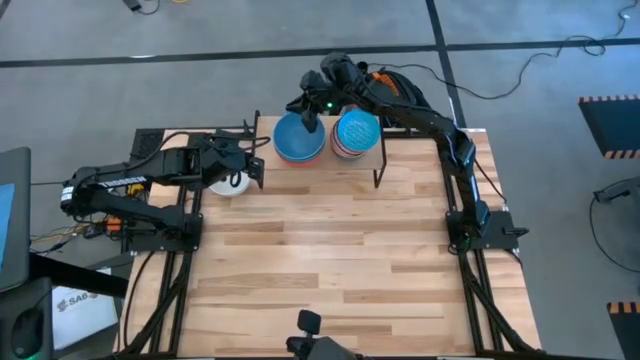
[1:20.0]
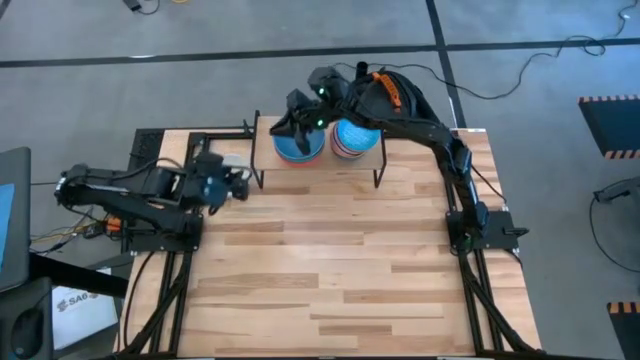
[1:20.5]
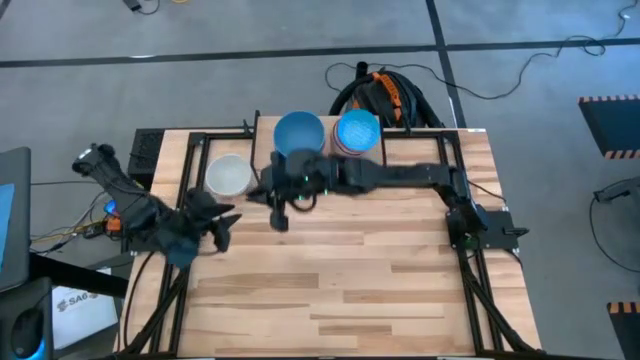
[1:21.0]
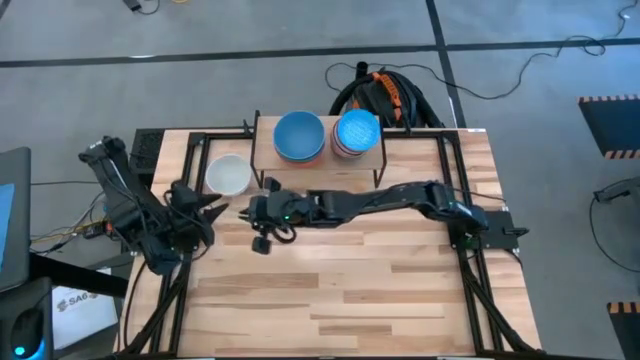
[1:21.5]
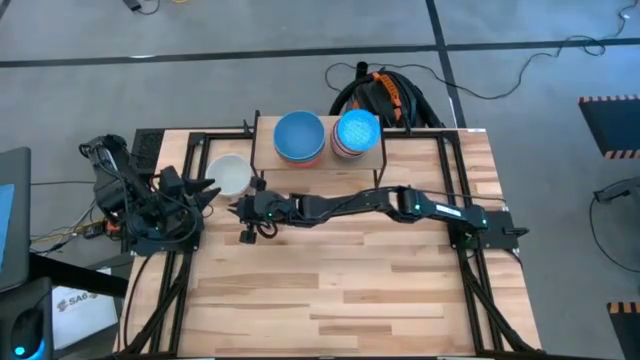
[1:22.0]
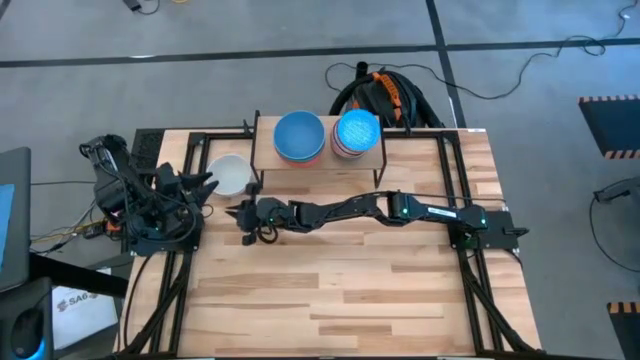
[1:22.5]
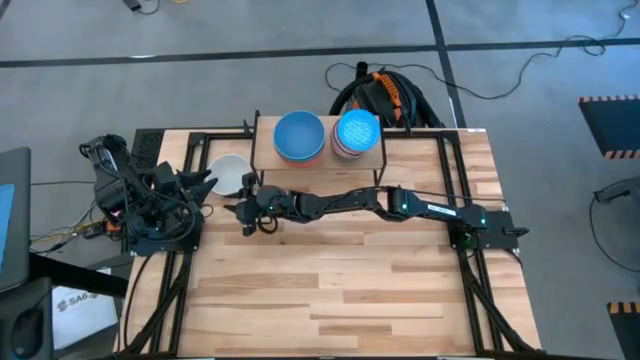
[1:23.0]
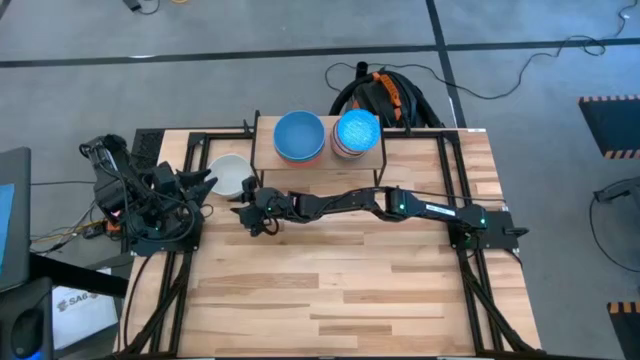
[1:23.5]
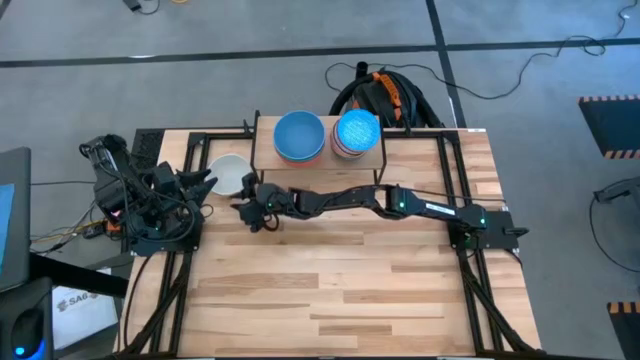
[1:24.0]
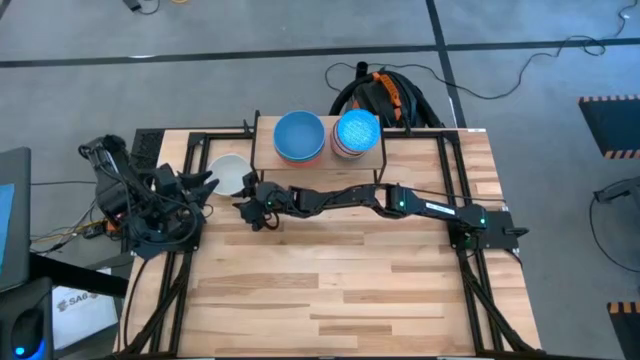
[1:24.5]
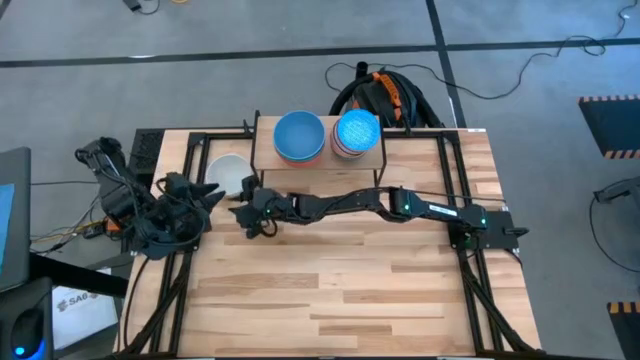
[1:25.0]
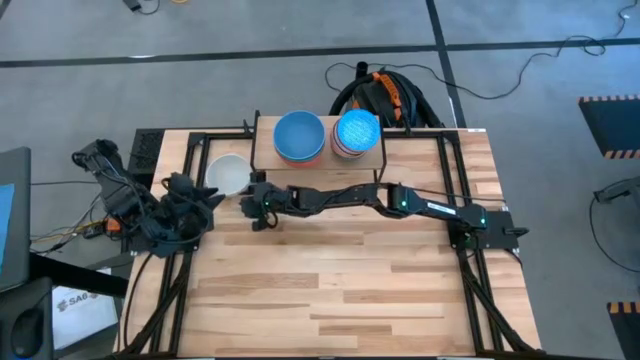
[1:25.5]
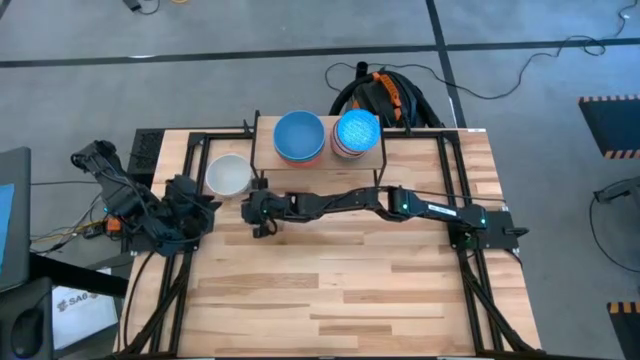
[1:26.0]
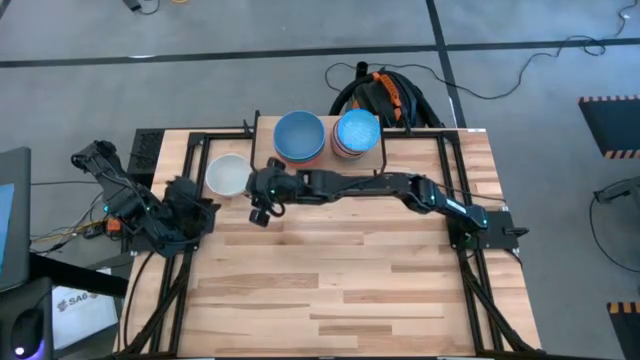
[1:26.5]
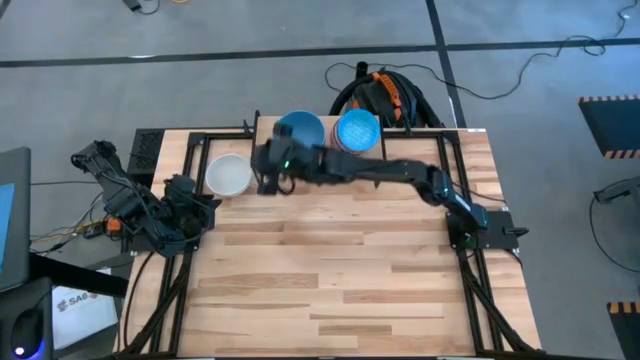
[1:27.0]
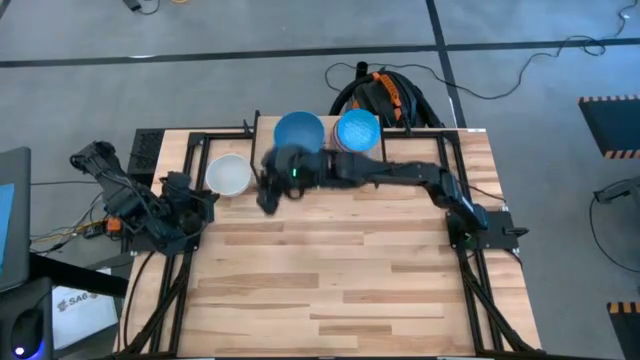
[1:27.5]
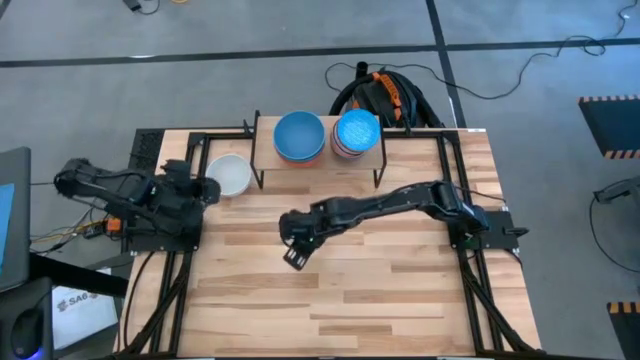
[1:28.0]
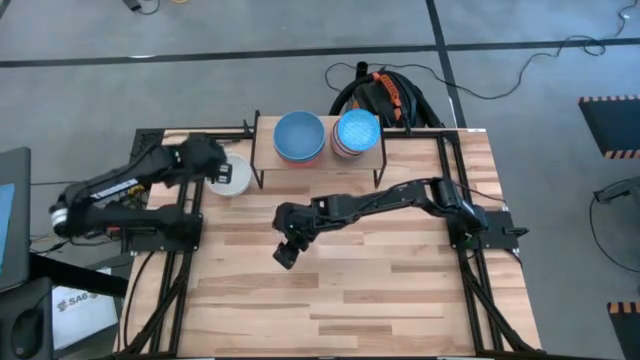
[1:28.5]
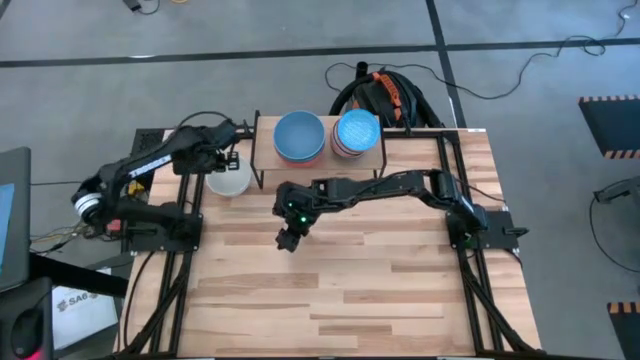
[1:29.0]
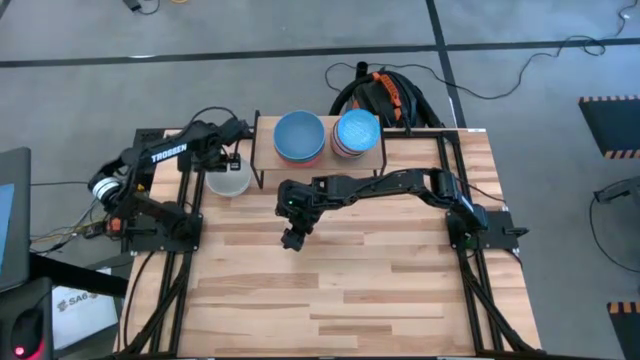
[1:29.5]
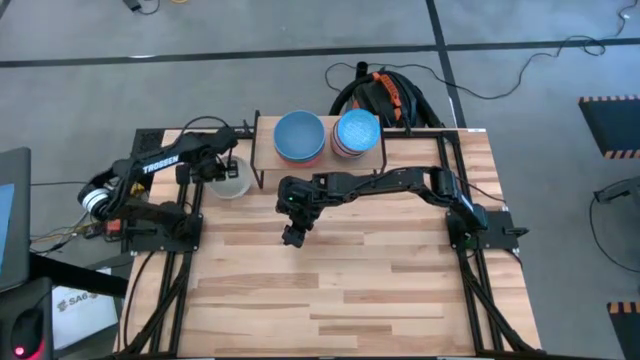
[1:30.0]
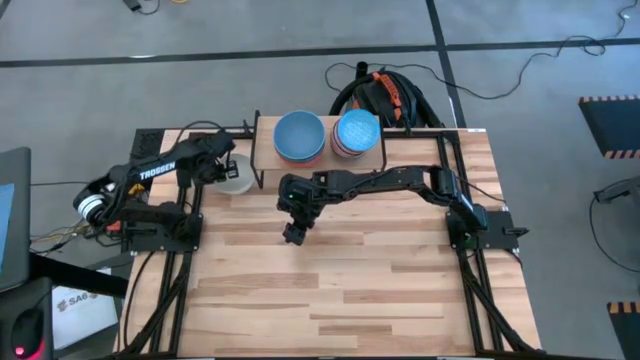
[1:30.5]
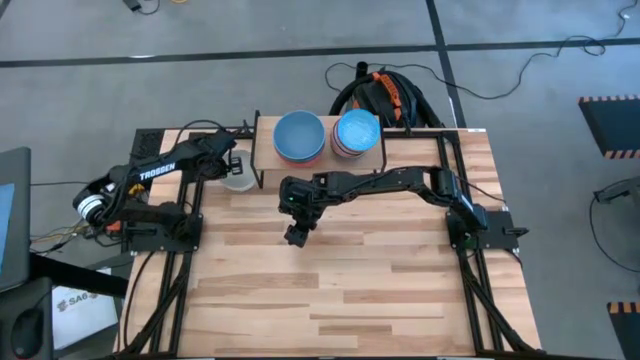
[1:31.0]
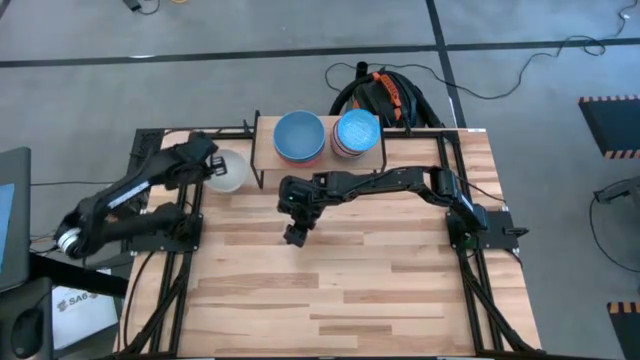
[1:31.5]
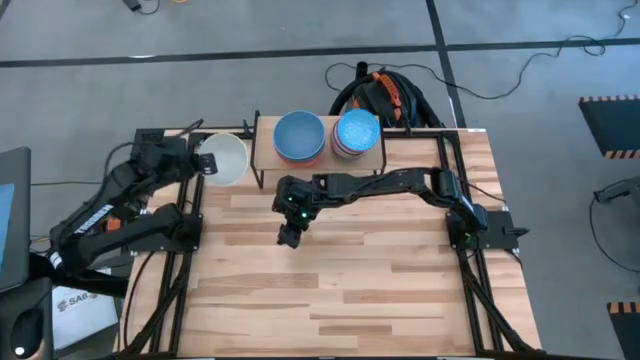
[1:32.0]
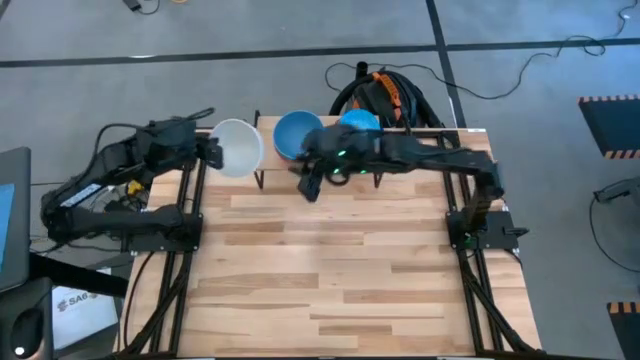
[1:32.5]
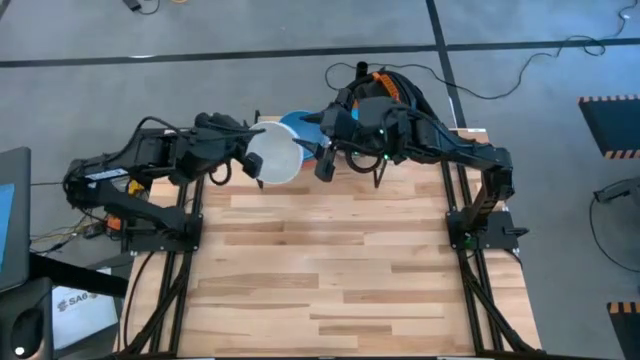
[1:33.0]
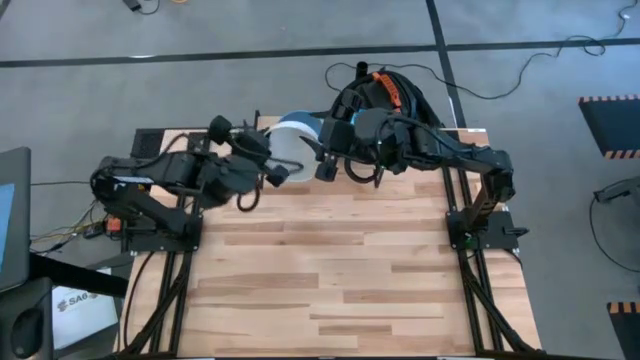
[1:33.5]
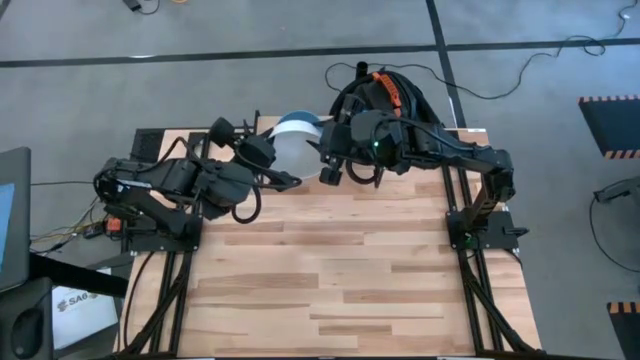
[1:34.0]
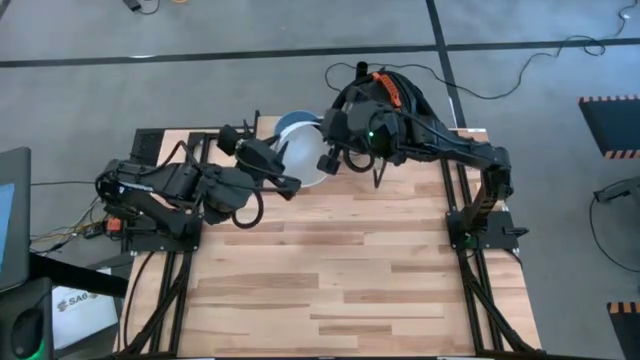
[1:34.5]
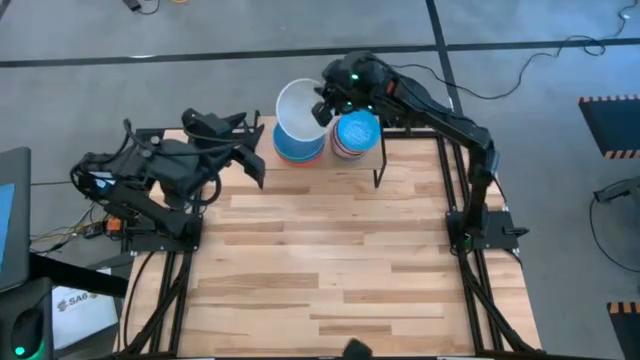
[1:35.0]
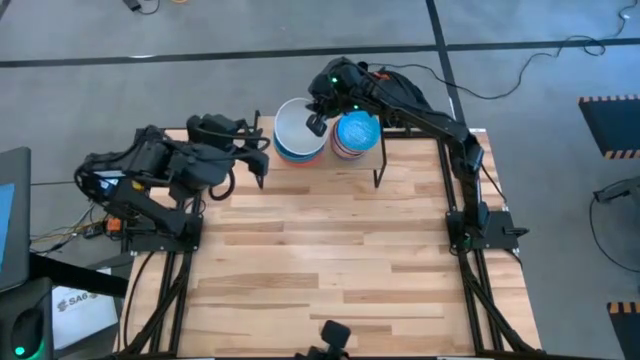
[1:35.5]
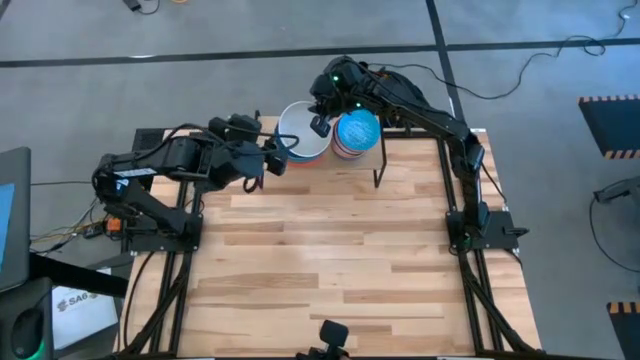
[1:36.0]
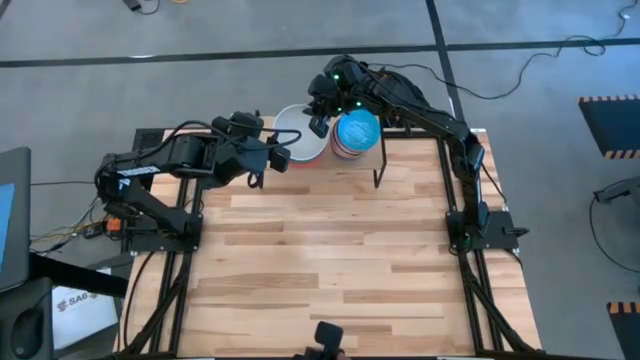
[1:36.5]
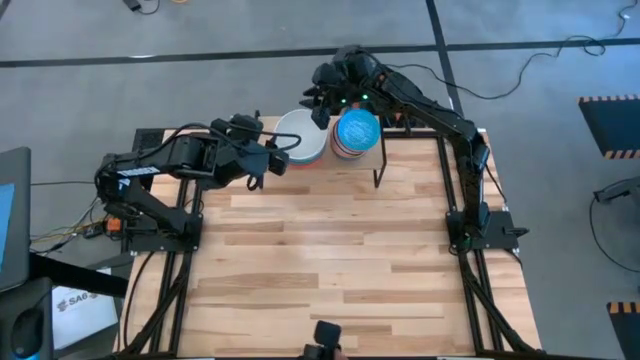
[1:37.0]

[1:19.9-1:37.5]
Task: Place and stack bowls onto a shelf
Stack the white bowl on top of the blue bowl on the shelf

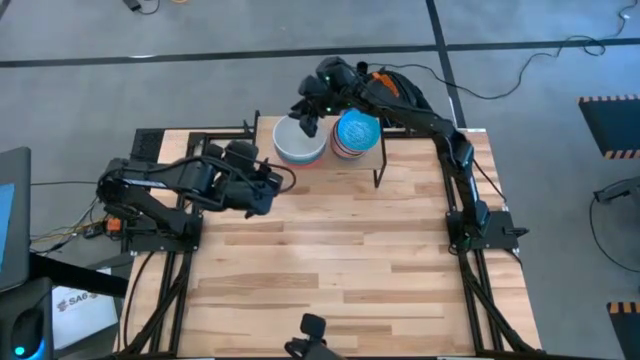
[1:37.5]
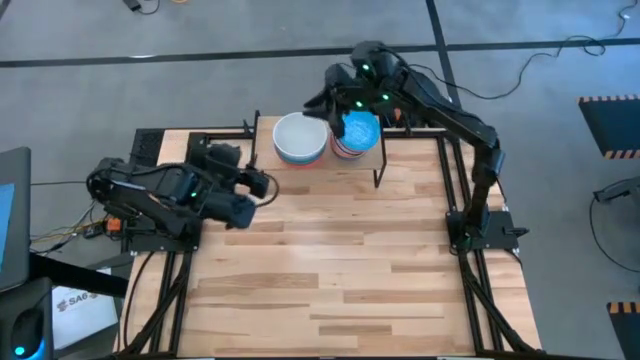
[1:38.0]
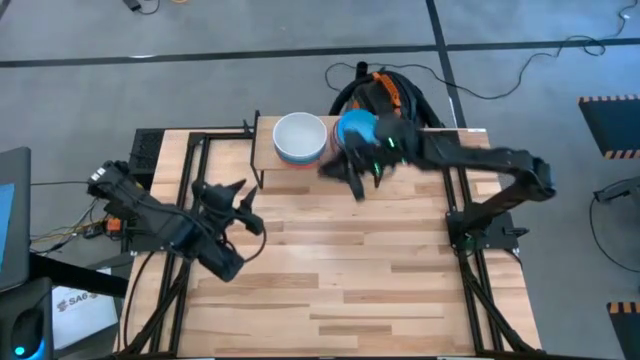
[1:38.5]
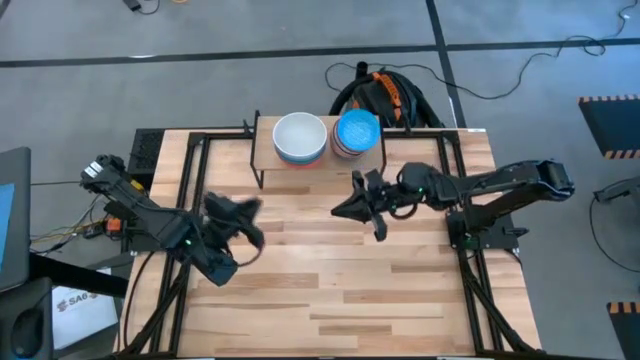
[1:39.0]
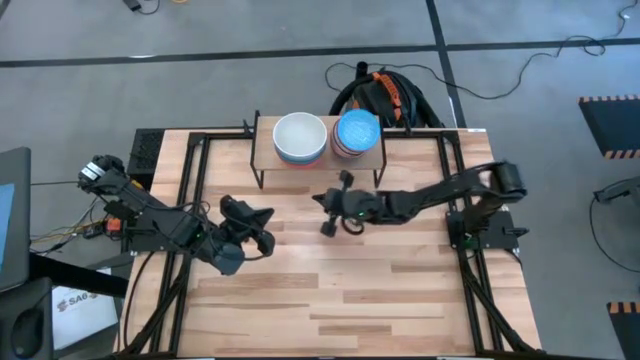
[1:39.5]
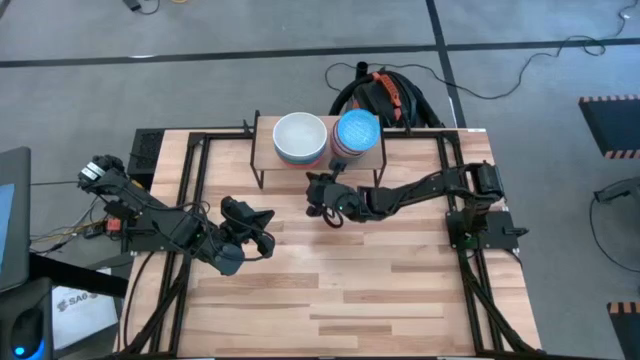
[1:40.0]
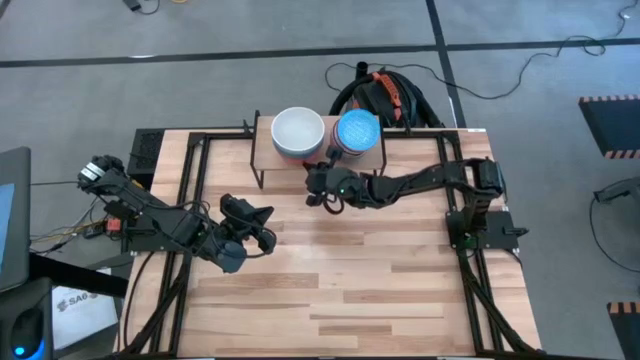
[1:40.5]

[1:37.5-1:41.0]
Adjust the bowls on the shelf
